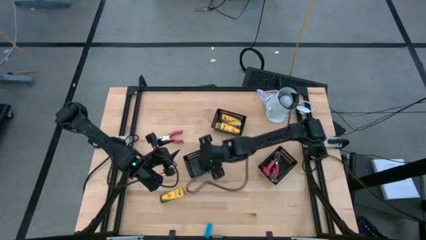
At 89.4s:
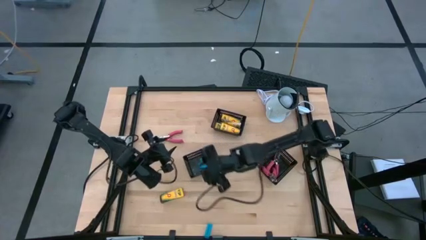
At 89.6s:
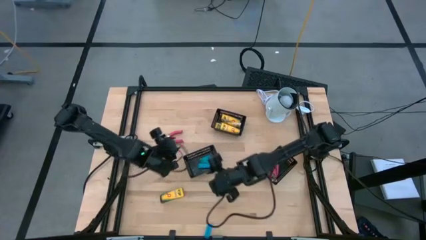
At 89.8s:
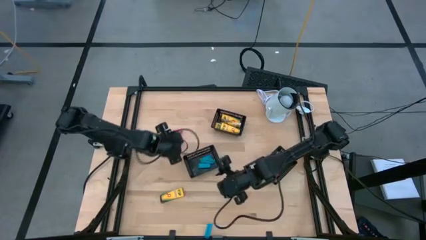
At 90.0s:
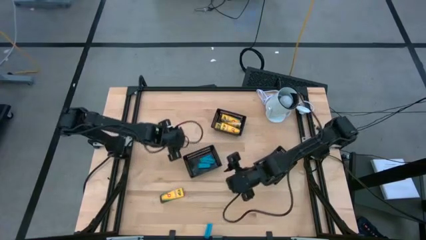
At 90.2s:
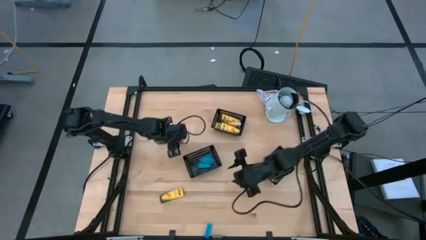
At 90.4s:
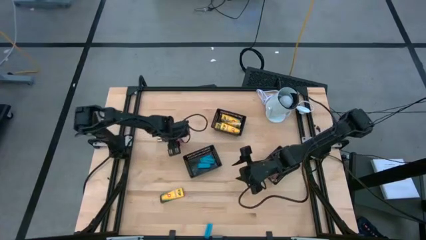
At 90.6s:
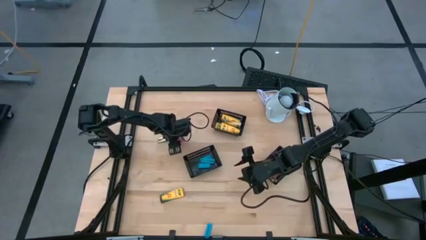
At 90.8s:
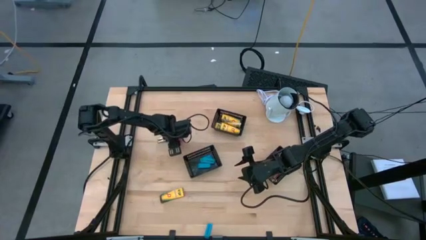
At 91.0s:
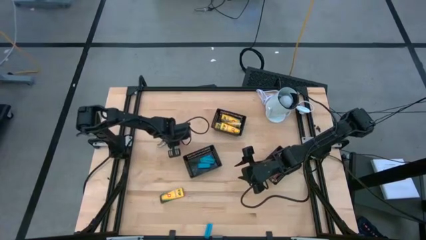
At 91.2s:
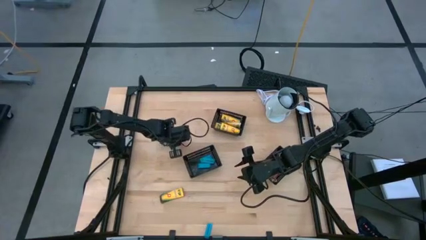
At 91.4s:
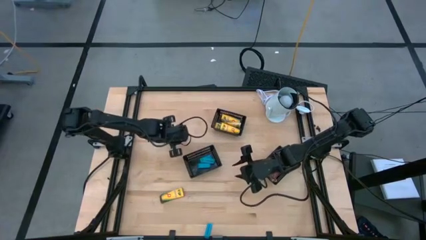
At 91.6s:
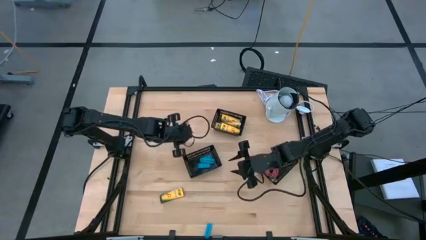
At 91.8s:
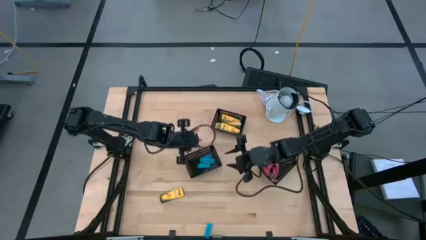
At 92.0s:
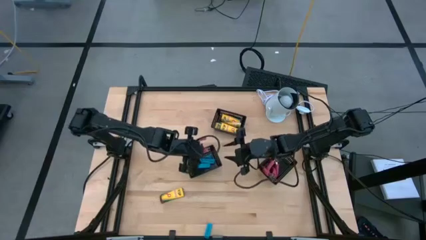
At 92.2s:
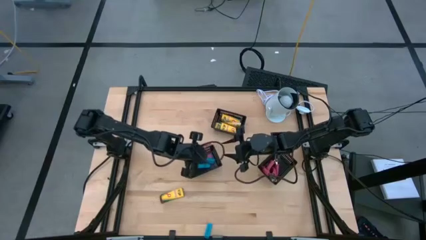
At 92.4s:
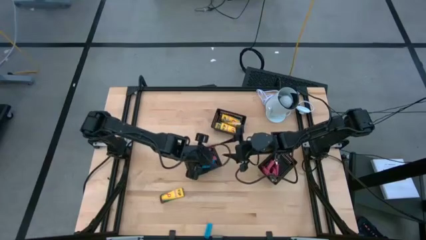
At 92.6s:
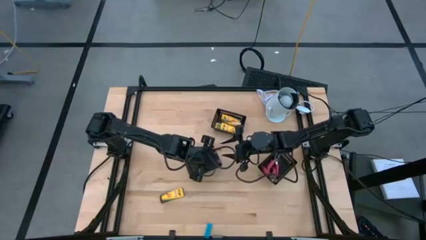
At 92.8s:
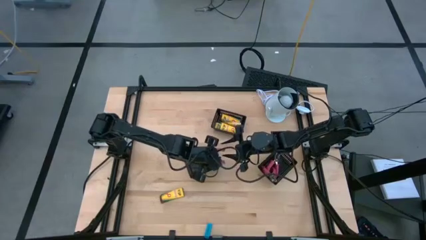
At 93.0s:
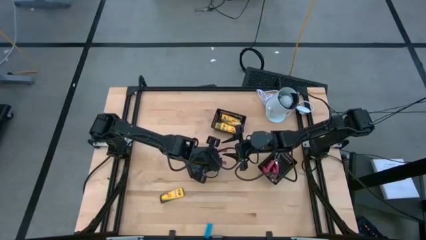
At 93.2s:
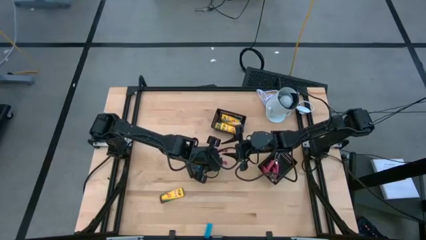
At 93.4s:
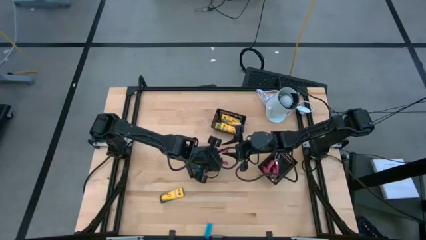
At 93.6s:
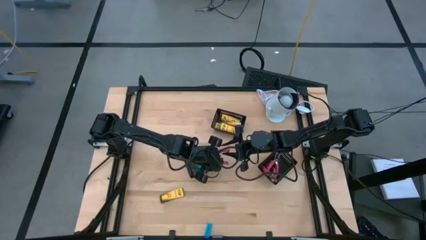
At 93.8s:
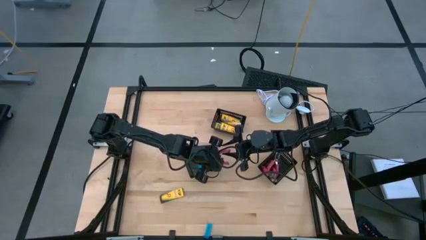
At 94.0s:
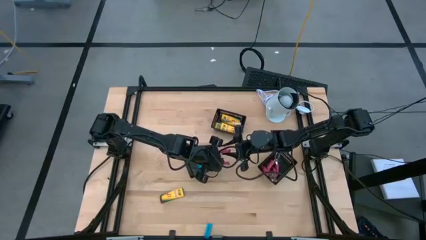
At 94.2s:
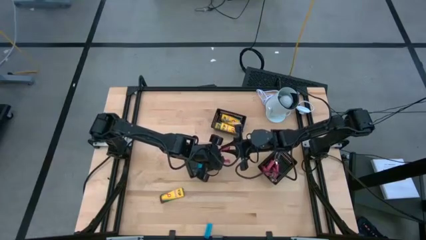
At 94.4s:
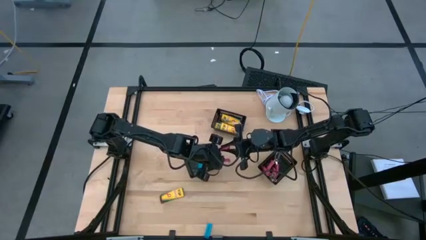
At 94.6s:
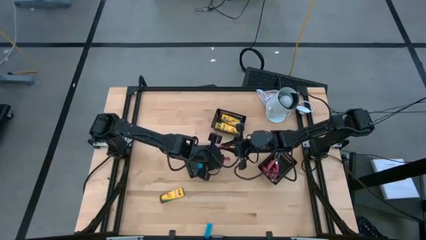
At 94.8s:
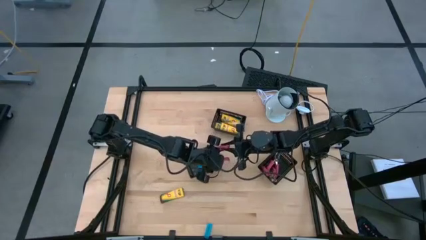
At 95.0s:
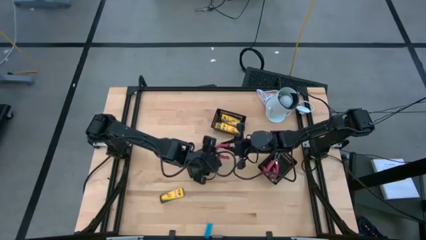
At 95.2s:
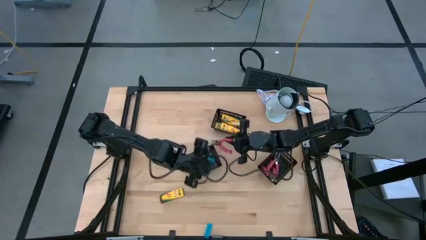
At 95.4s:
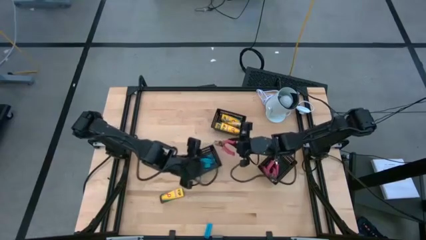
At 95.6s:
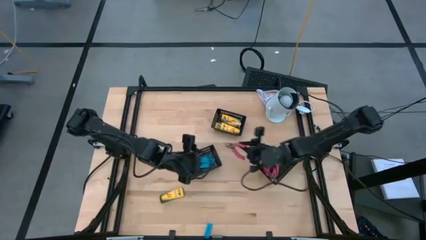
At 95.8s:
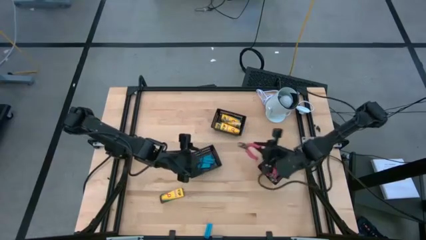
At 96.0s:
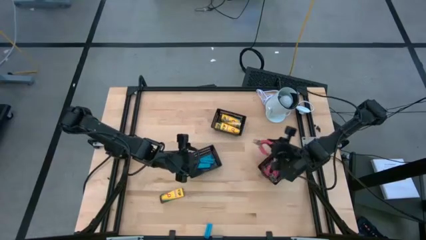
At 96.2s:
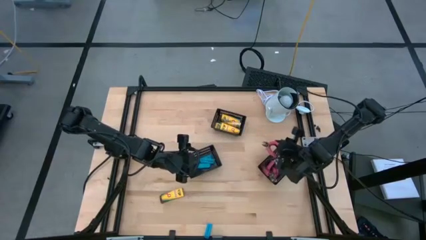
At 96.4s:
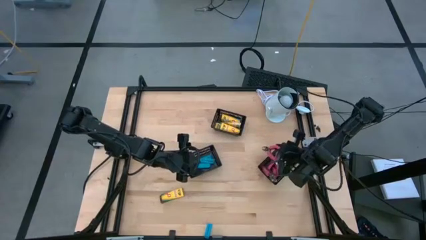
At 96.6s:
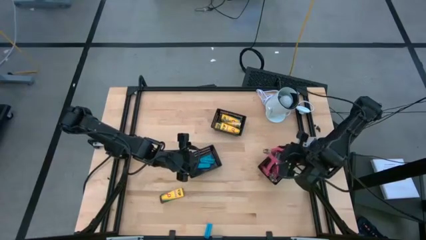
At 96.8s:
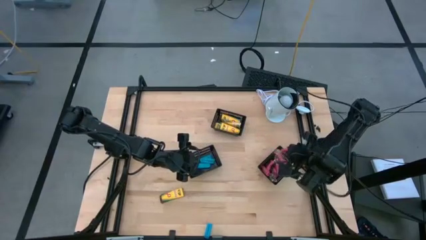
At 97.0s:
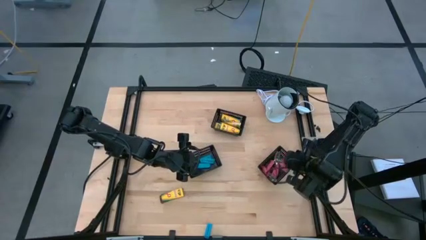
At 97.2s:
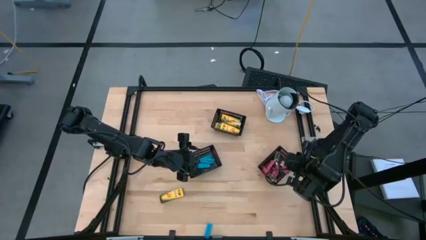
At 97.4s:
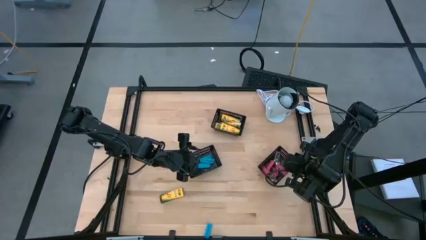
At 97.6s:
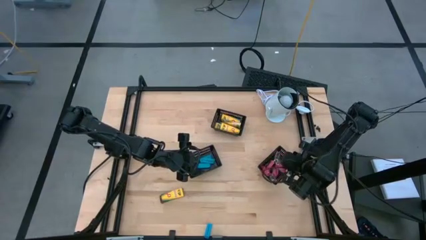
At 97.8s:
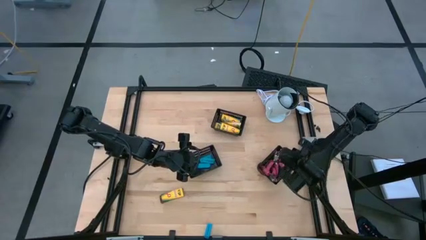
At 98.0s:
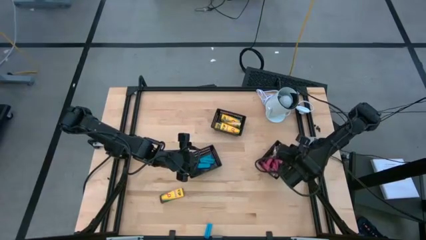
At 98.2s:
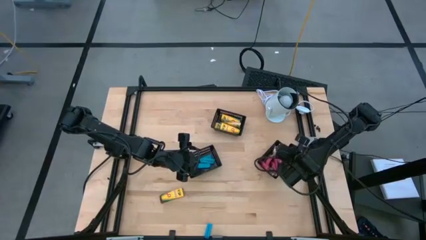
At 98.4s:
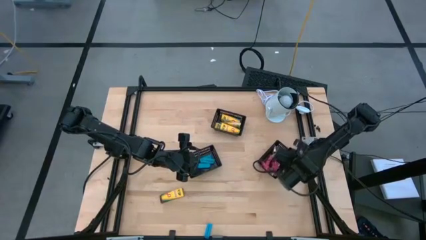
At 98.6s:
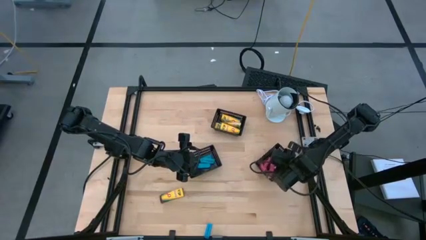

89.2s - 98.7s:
Task: Pick & Place School Supplies
Put the pink hole puncher into the bottom right black bin

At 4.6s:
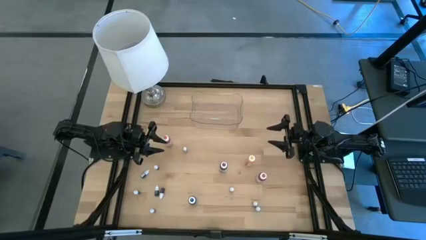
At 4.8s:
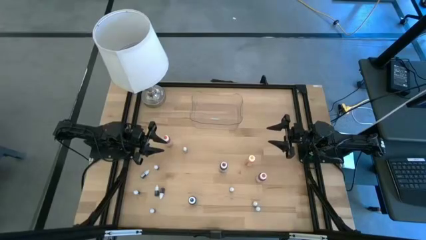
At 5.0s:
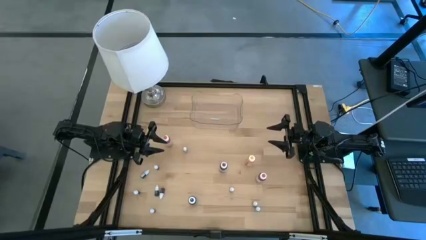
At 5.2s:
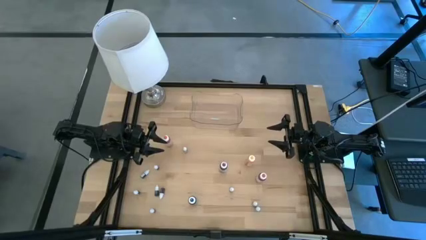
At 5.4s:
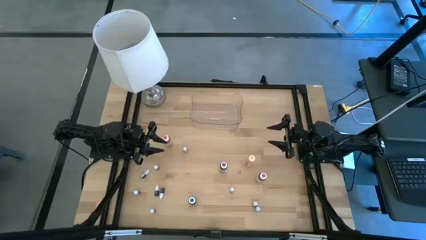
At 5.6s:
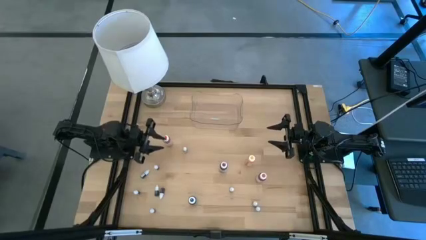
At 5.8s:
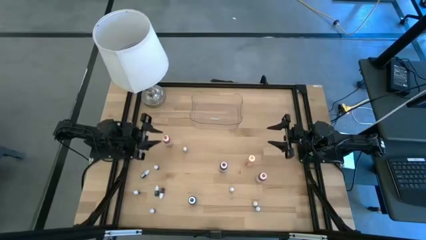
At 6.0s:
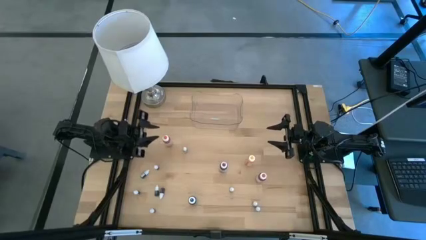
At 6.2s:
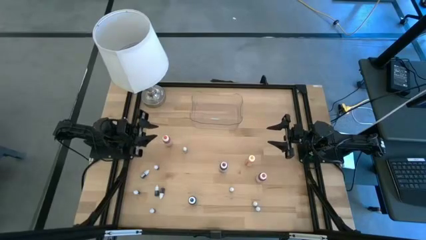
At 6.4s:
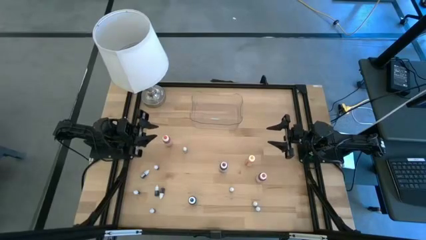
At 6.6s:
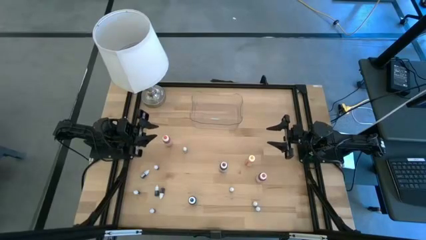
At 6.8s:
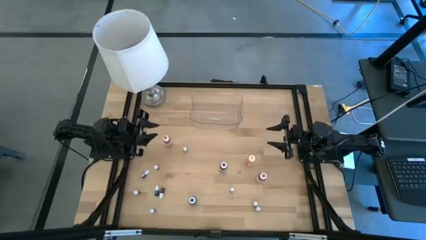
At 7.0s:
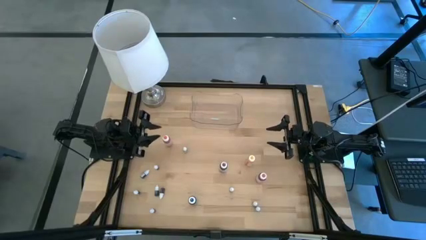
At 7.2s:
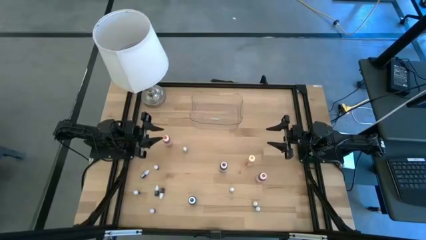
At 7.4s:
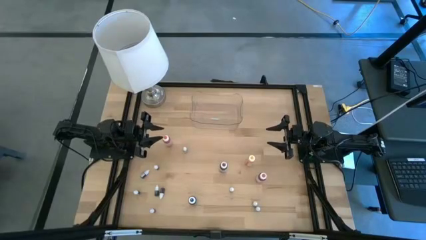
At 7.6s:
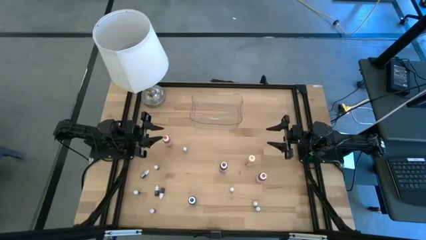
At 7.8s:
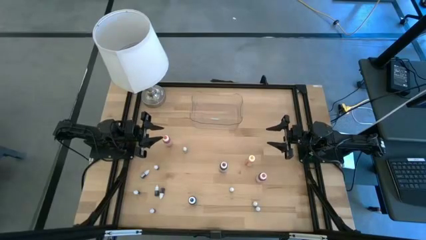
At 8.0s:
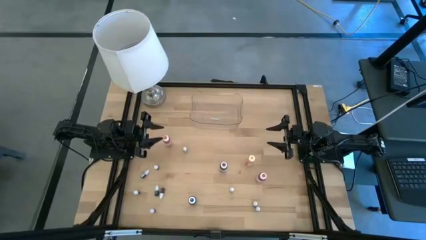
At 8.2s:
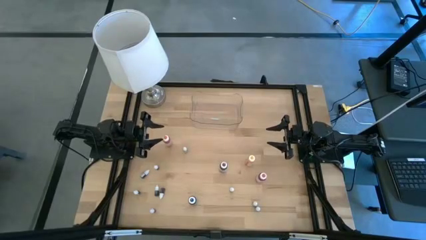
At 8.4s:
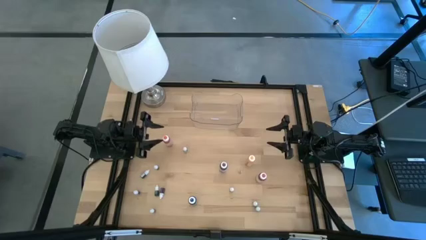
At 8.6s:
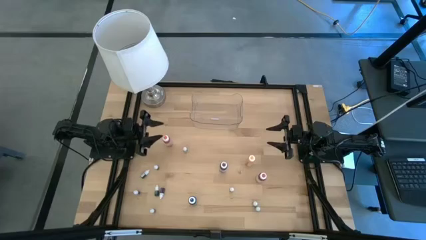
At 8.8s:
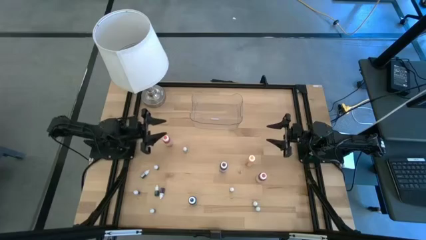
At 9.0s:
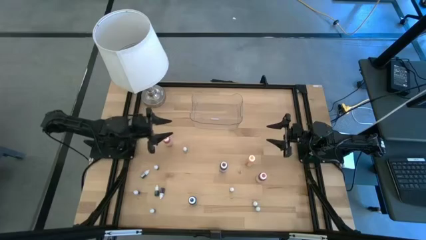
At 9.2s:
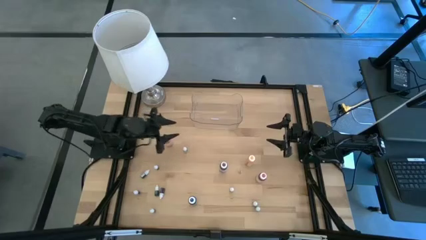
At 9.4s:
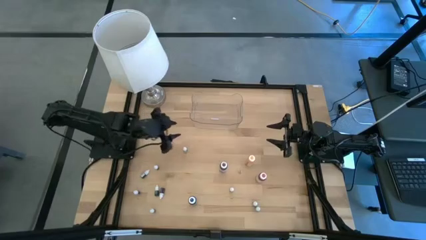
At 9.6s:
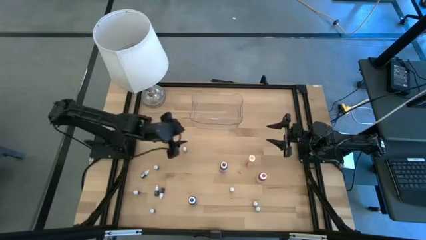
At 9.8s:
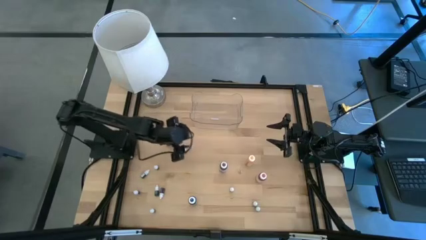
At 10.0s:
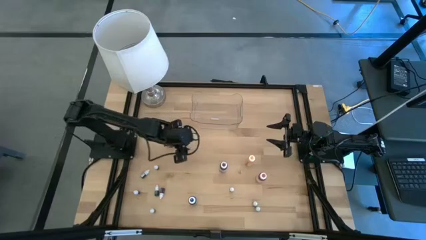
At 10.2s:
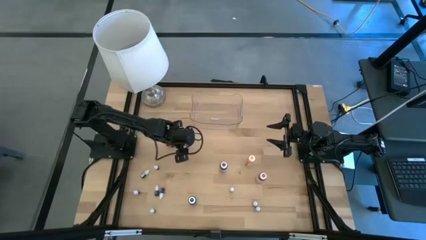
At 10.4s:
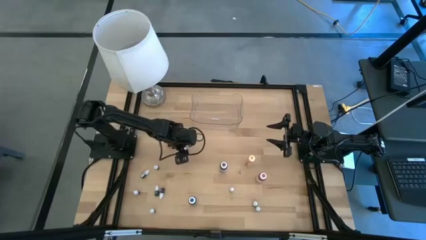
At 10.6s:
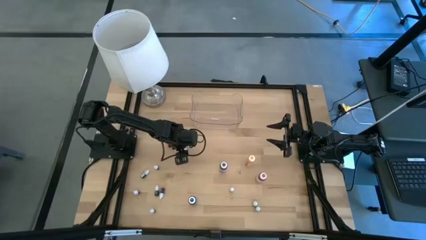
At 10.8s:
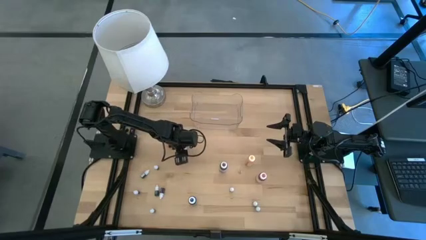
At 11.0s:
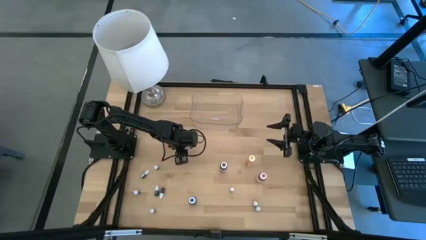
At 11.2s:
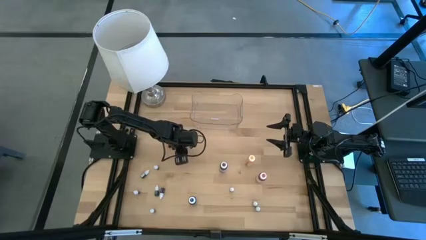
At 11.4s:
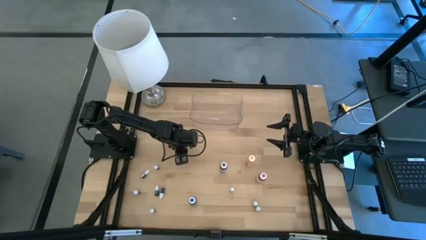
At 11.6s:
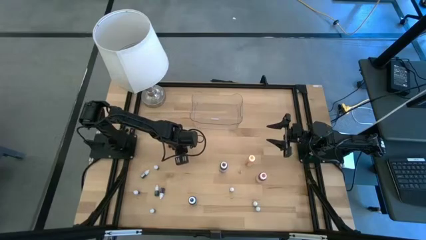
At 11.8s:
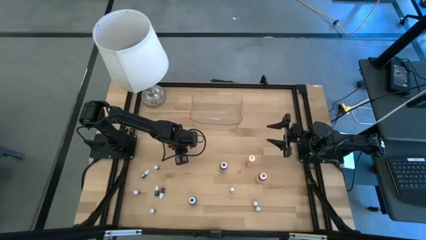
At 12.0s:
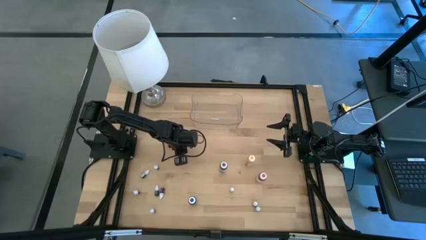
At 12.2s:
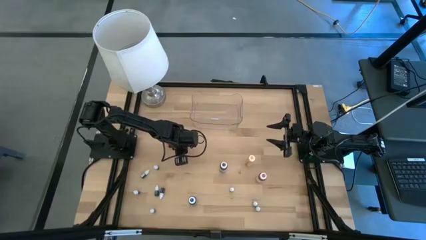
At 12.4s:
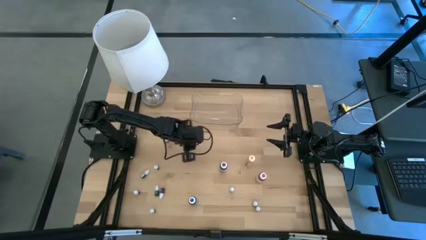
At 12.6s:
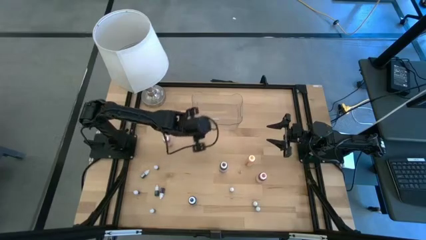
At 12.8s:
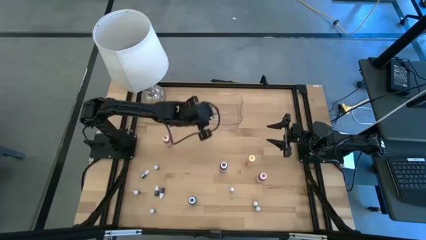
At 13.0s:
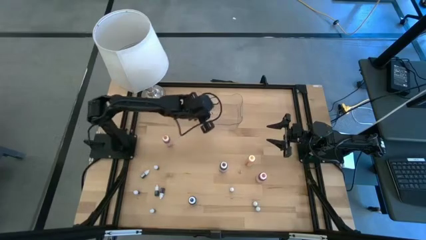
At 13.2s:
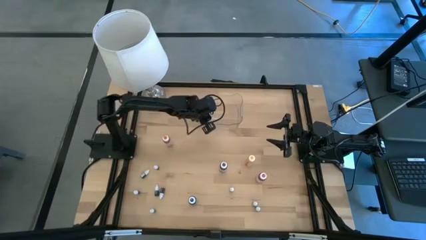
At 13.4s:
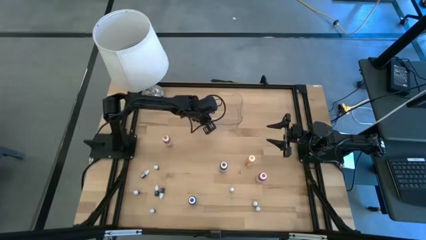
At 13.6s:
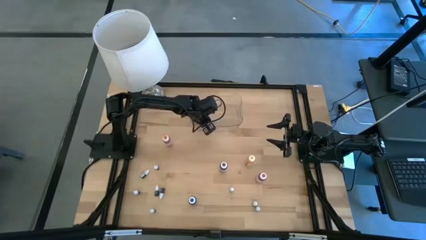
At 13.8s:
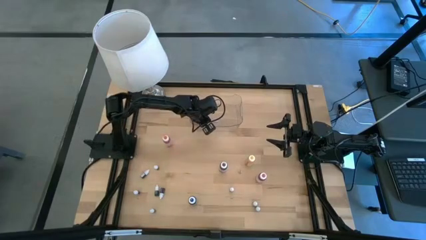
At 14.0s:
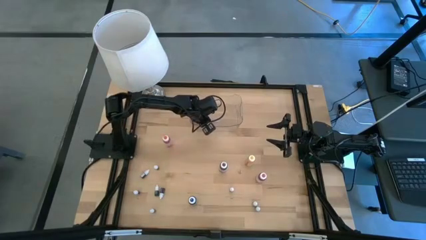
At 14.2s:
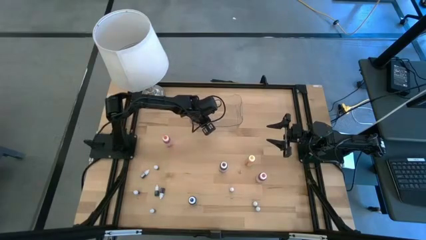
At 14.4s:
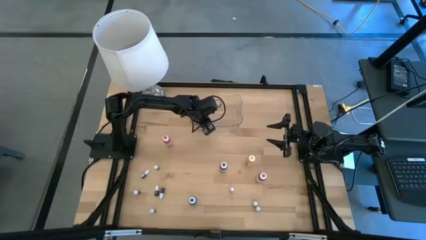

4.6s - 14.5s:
Task: Pick & Place food coloring
Put the top small pink food coloring bottle into the transparent bin
